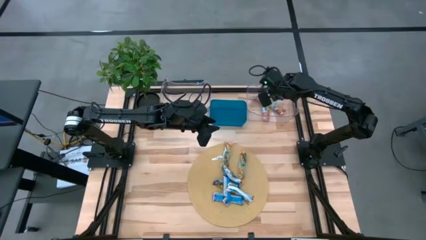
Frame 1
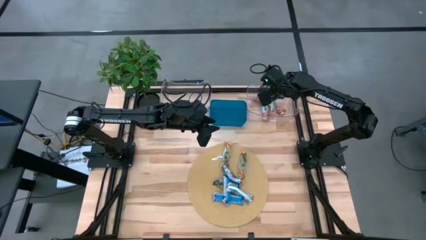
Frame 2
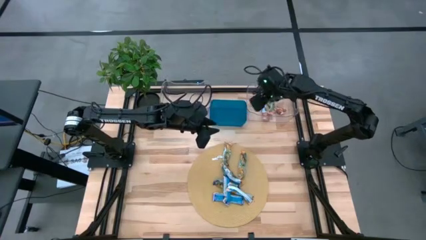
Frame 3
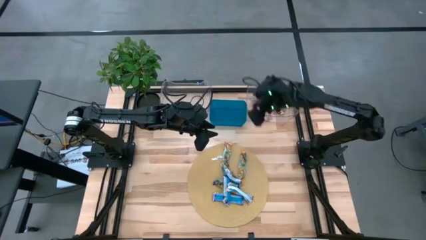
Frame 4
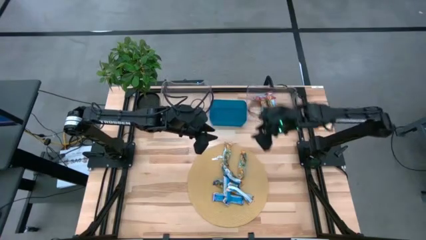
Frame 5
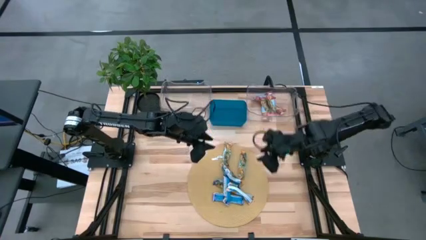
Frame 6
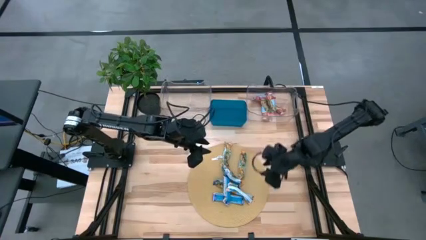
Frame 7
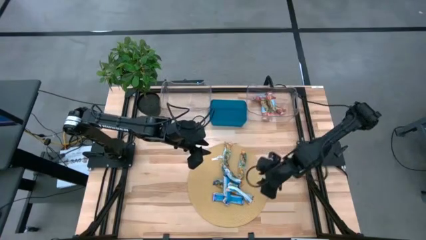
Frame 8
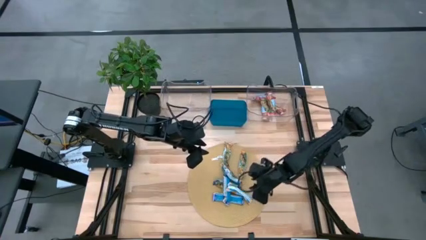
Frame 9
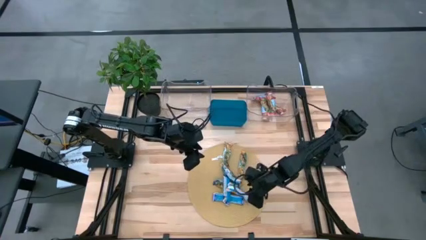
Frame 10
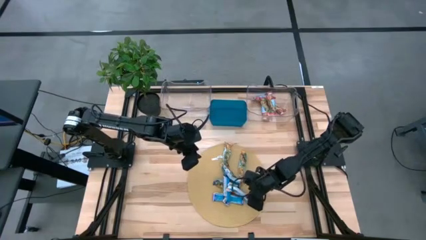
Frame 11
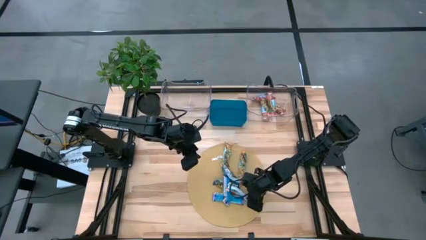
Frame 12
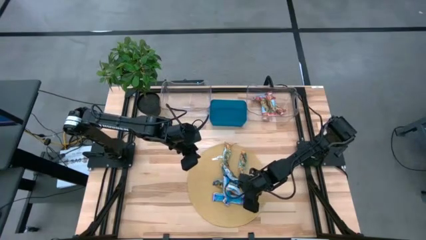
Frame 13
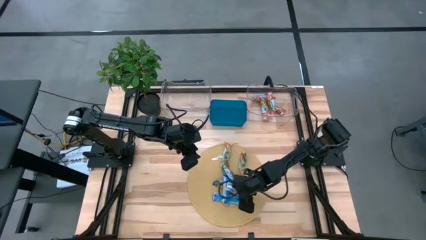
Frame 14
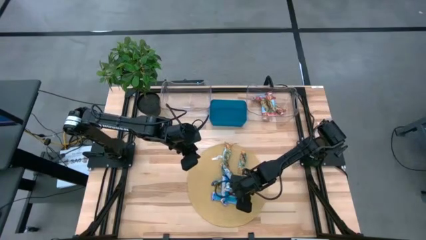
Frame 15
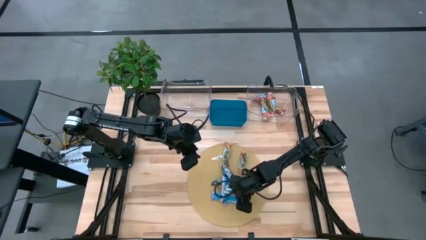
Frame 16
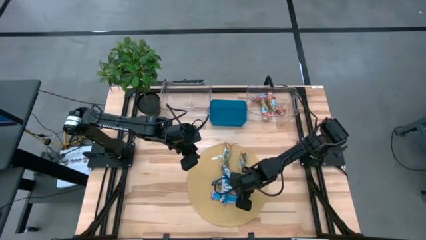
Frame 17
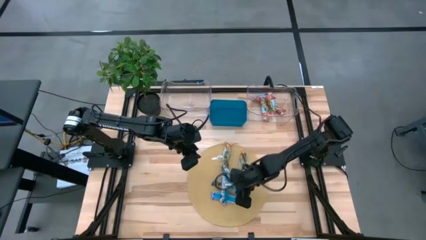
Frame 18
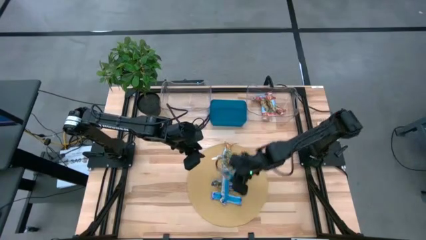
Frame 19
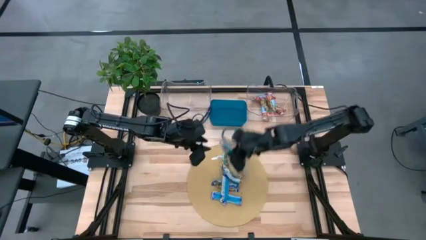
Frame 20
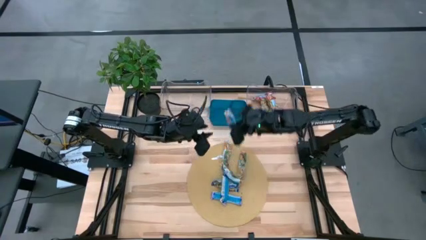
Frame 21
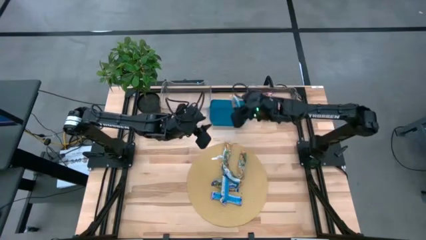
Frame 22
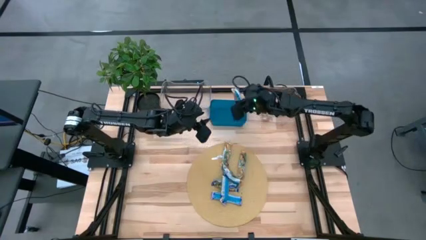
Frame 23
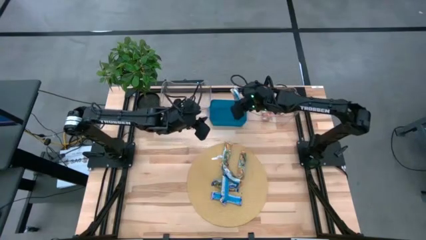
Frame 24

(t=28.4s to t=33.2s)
Task: Pick and place Granola Bars by type
Put the orange granola bar into the blue bin

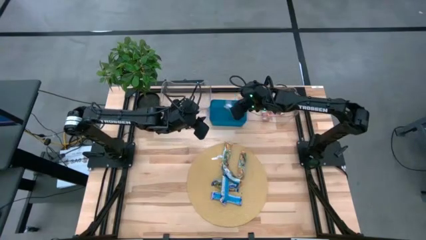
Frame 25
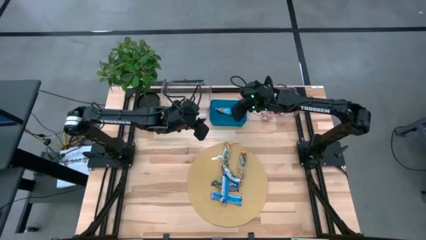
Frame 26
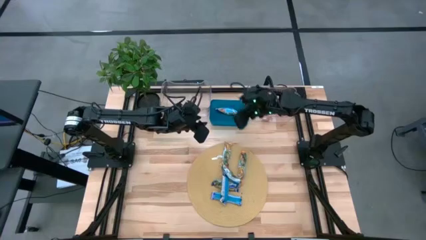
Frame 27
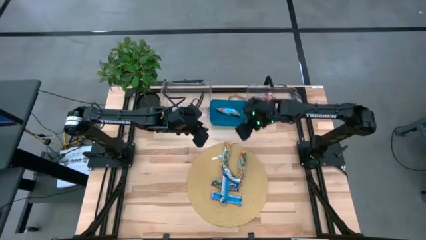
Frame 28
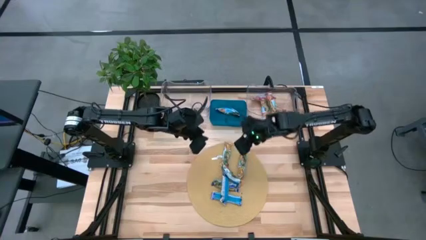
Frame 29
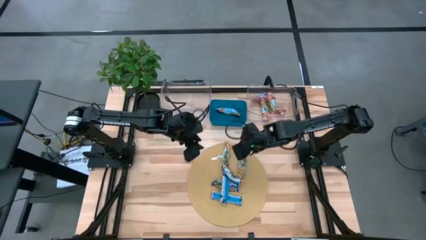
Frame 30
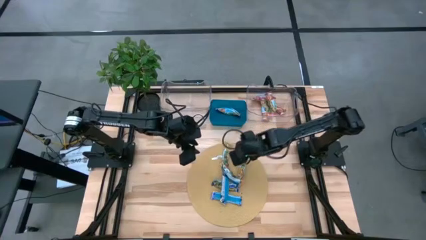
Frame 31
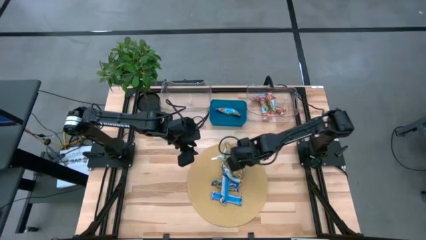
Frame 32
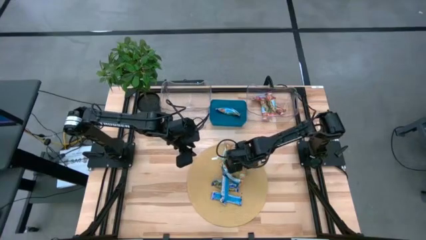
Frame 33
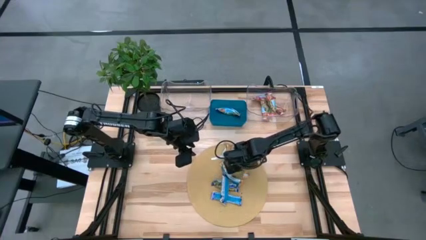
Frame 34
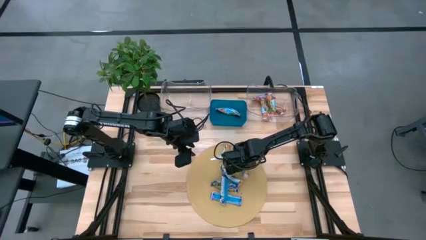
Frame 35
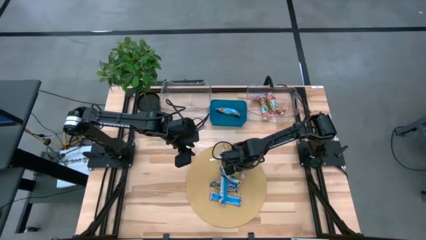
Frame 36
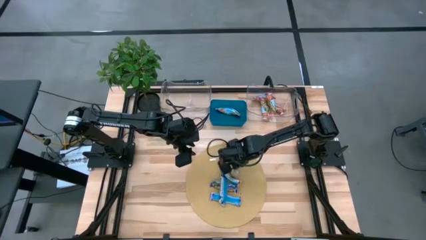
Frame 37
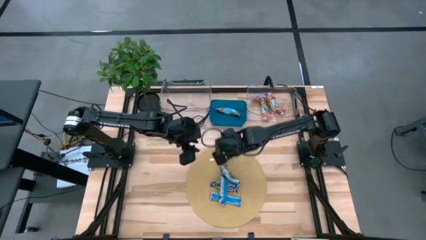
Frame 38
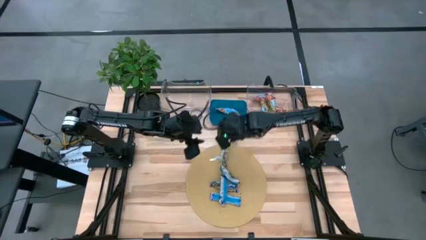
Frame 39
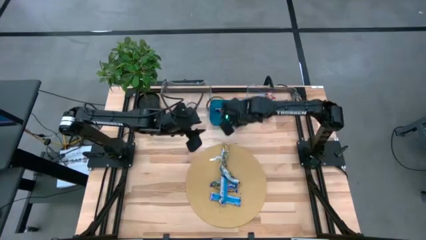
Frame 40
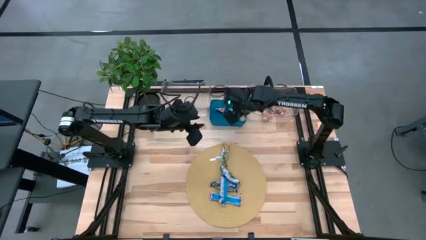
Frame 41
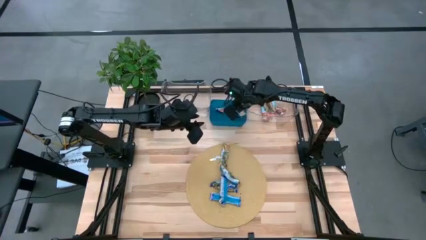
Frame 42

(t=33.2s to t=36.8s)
Put the orange granola bar into the blue bin

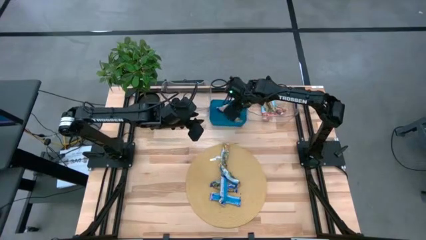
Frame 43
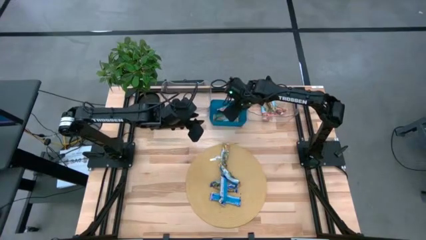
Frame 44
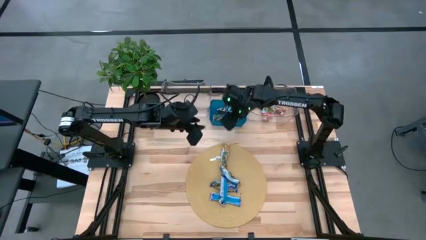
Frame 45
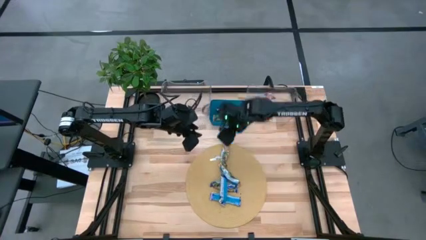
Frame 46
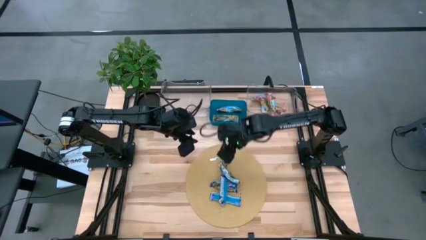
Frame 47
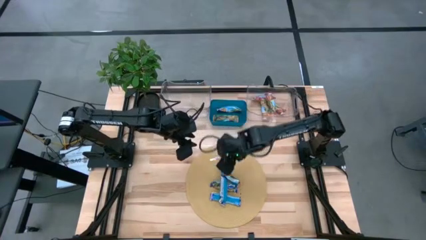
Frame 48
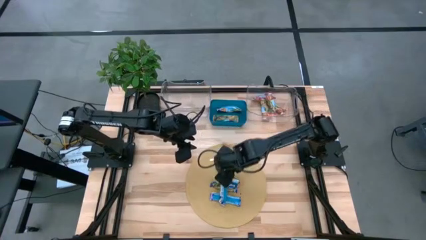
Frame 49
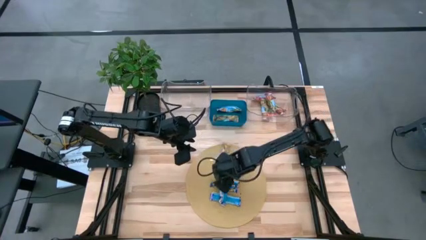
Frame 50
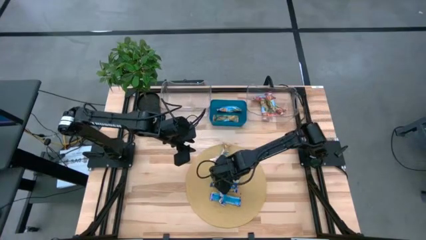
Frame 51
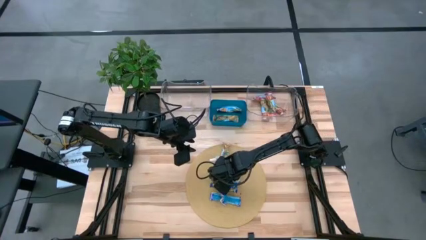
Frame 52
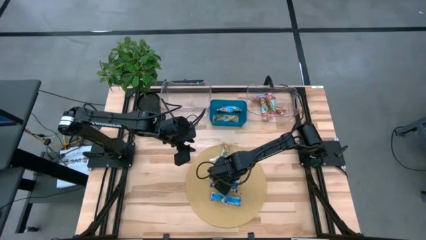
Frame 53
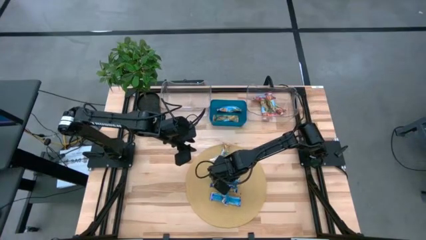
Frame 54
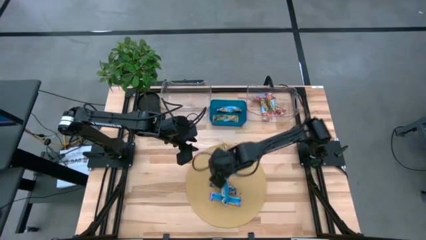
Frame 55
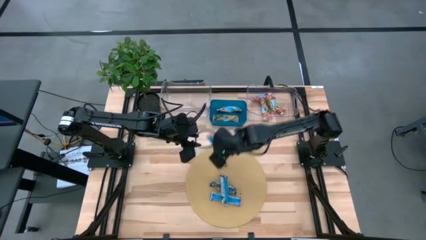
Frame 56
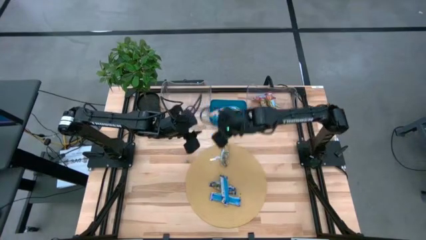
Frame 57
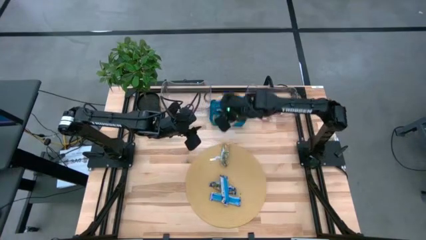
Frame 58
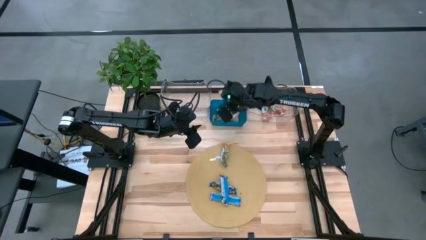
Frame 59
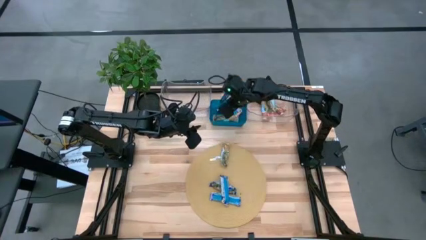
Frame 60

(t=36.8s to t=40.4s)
Put the orange granola bar into the blue bin

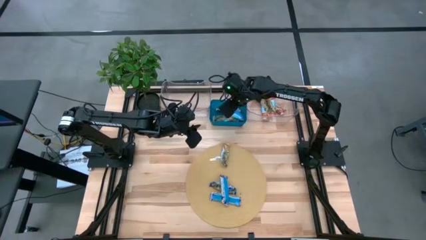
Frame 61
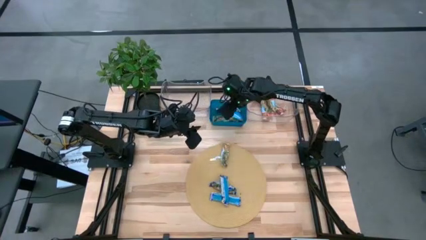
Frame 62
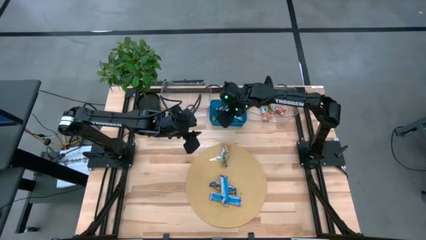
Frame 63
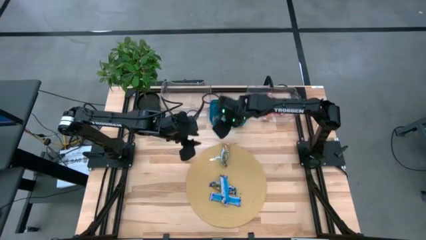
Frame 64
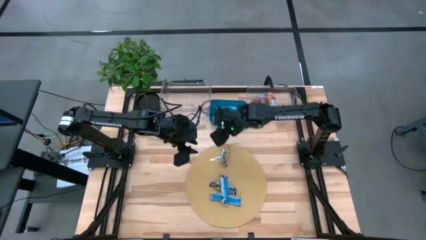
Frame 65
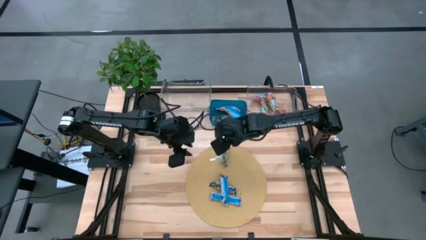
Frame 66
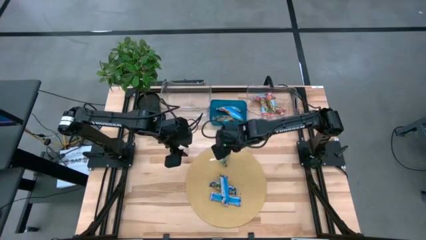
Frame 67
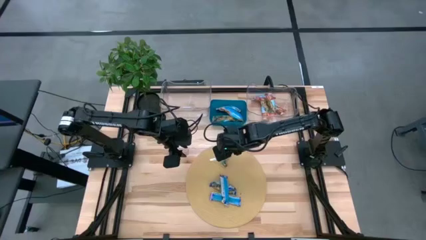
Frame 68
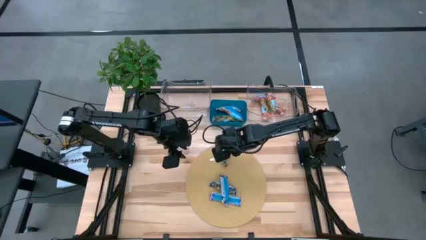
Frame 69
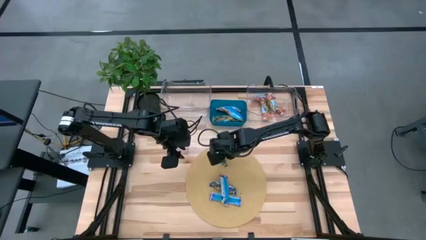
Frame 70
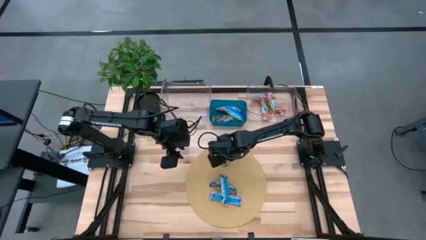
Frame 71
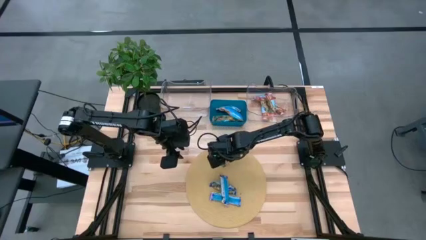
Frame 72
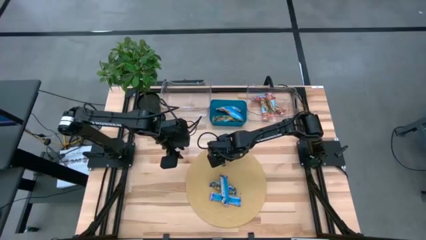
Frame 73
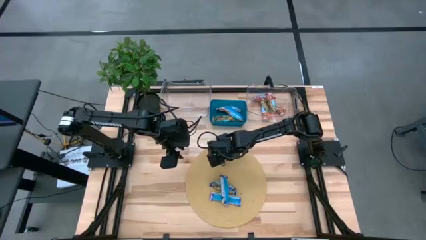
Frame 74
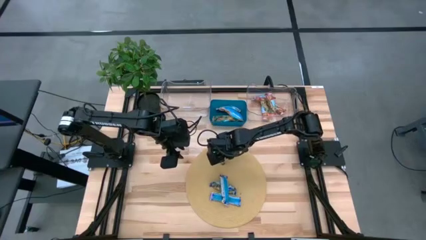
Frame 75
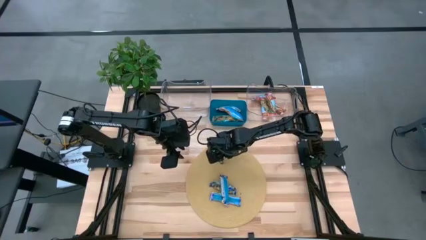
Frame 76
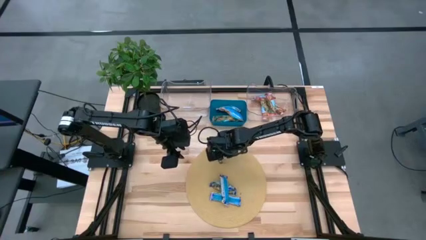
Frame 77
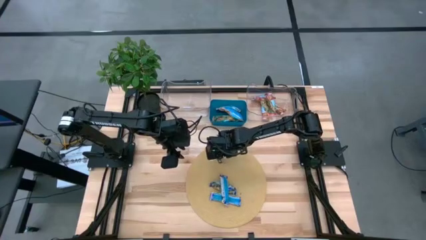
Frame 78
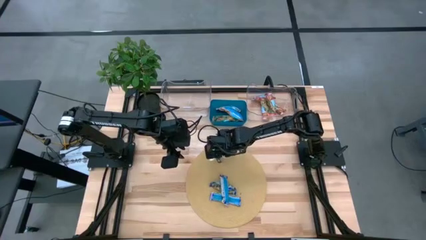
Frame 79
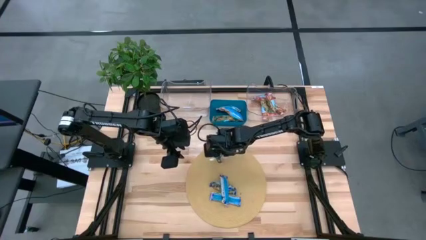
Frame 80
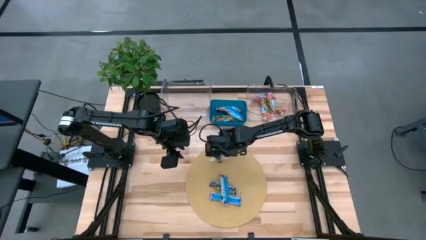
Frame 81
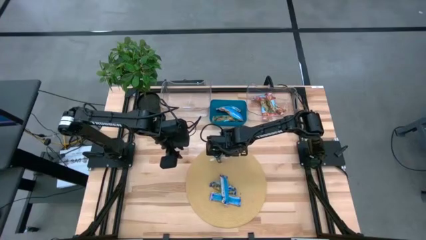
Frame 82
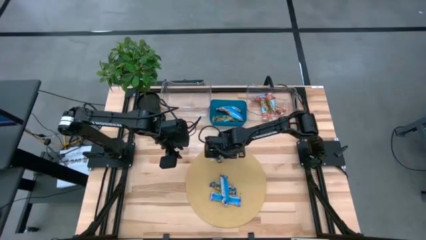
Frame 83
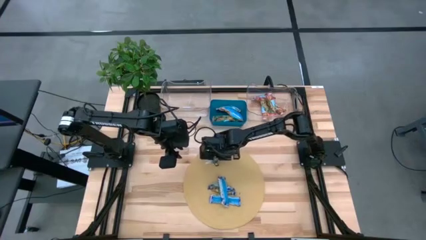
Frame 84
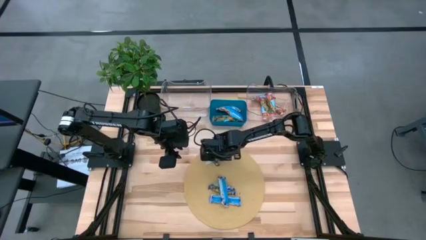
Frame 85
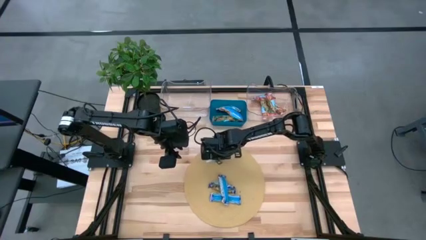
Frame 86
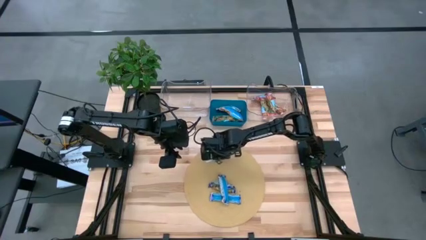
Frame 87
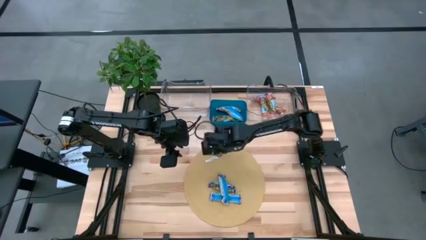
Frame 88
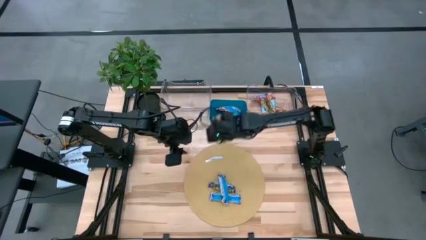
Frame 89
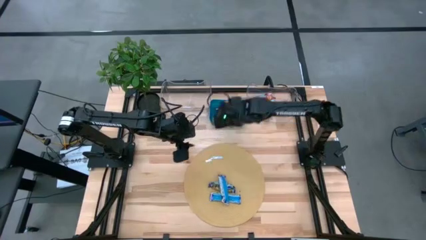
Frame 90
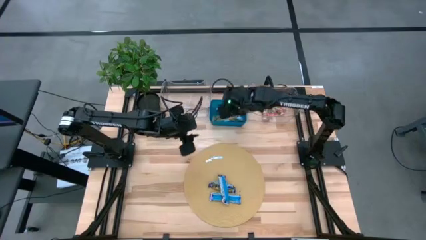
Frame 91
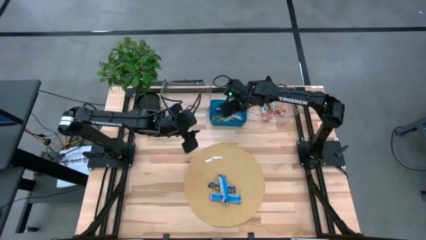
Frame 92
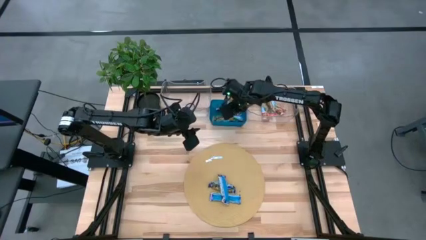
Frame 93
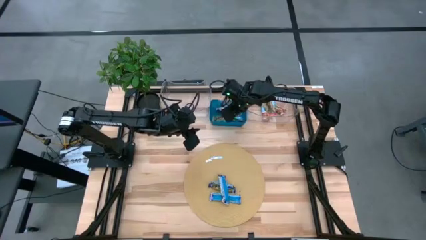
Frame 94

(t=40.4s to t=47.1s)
Put the orange granola bar into the blue bin
